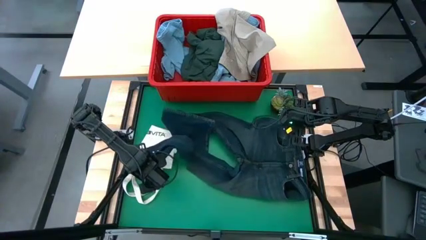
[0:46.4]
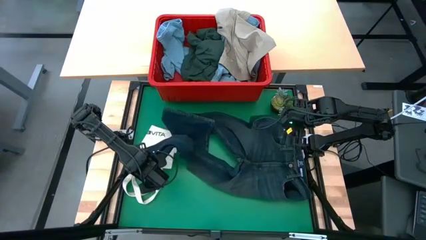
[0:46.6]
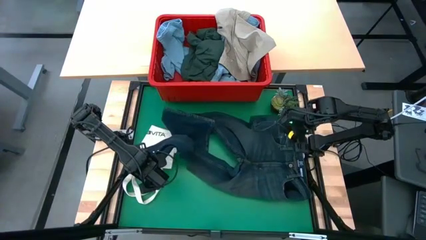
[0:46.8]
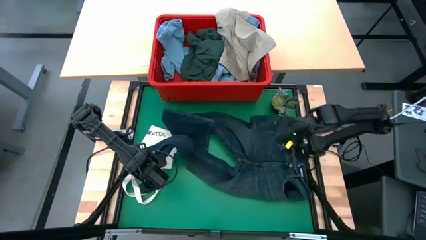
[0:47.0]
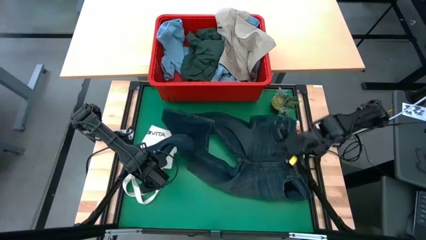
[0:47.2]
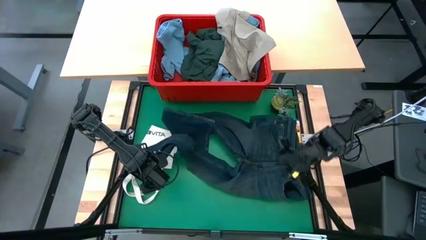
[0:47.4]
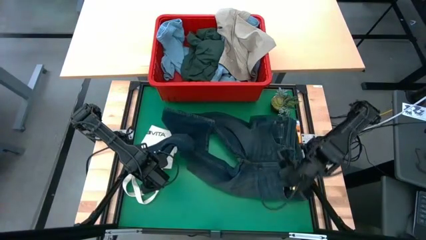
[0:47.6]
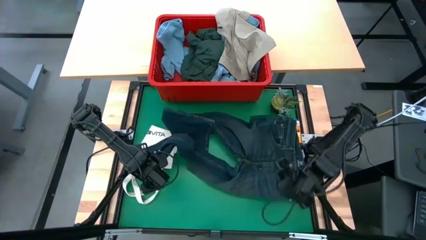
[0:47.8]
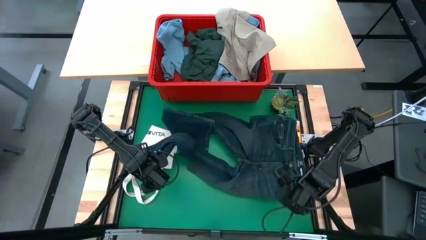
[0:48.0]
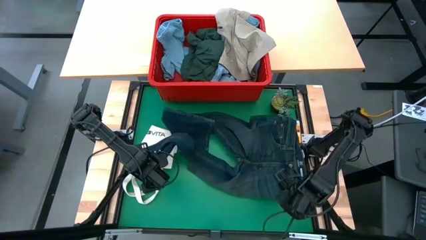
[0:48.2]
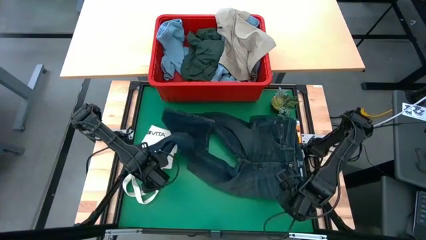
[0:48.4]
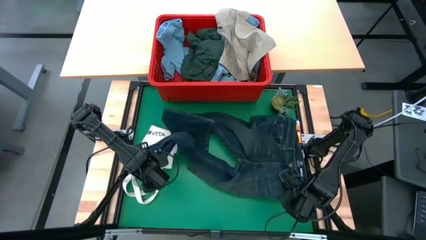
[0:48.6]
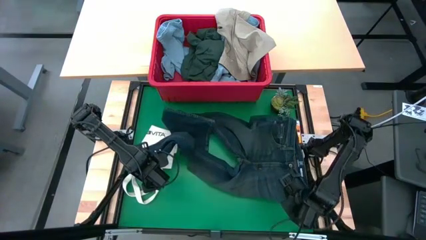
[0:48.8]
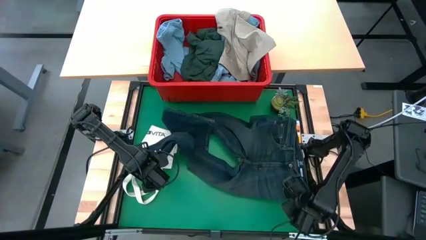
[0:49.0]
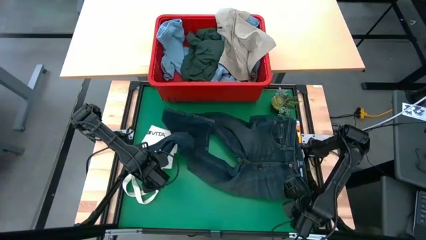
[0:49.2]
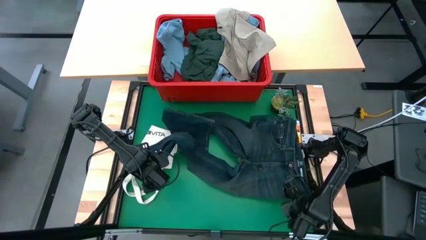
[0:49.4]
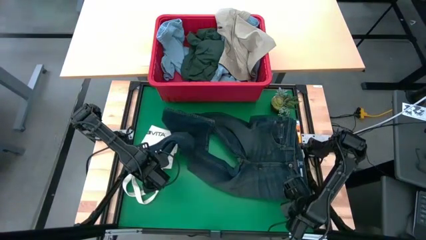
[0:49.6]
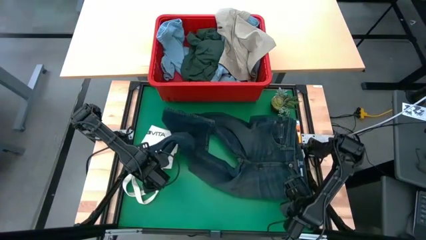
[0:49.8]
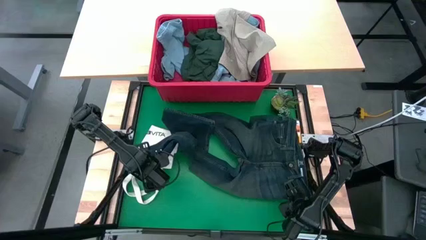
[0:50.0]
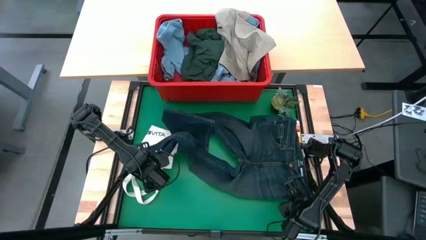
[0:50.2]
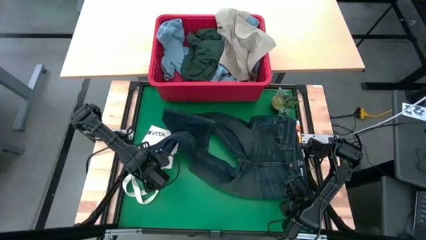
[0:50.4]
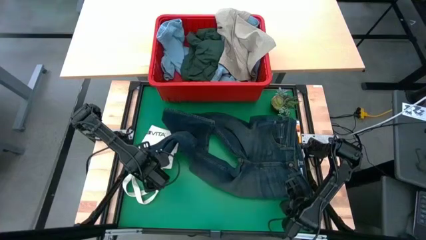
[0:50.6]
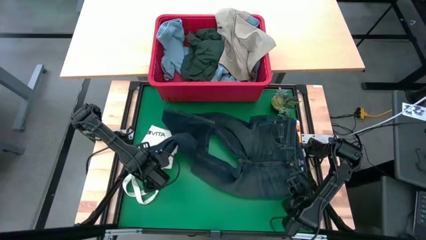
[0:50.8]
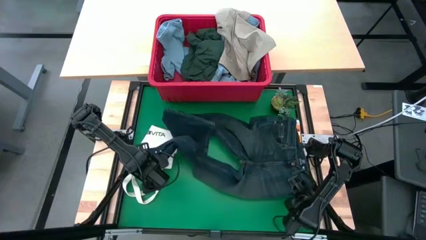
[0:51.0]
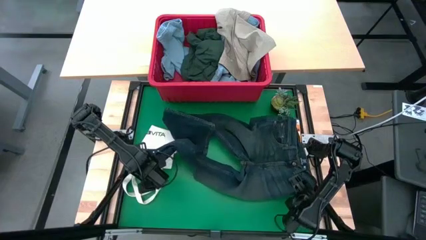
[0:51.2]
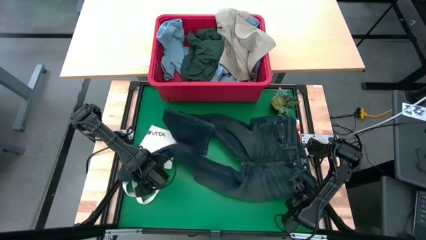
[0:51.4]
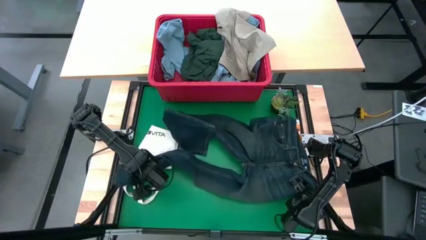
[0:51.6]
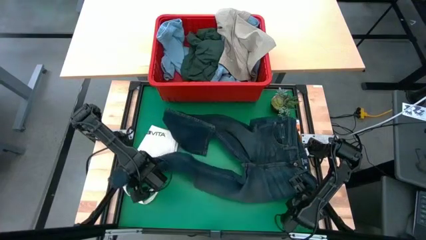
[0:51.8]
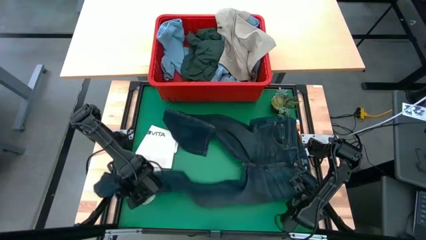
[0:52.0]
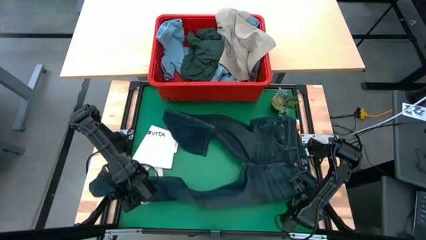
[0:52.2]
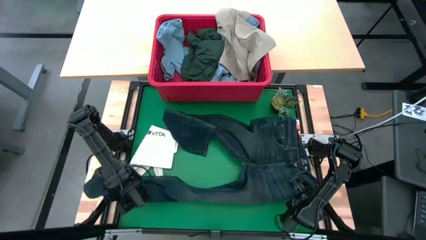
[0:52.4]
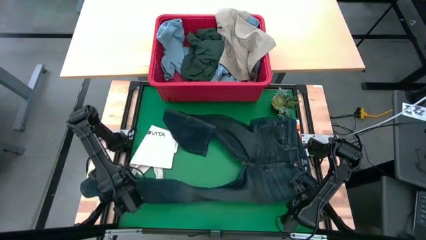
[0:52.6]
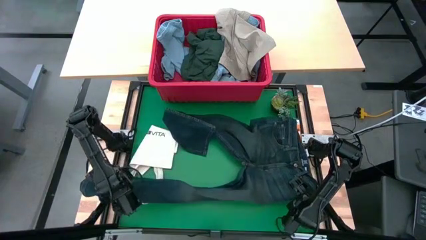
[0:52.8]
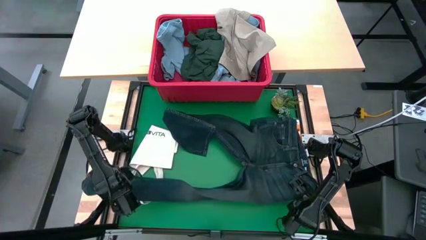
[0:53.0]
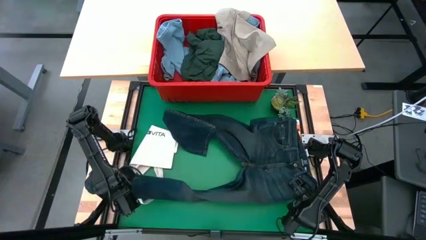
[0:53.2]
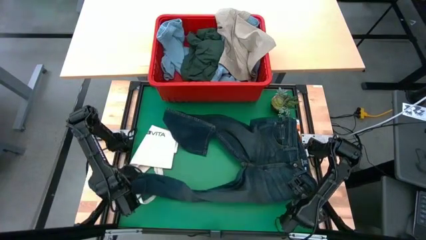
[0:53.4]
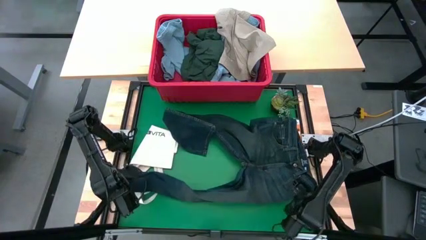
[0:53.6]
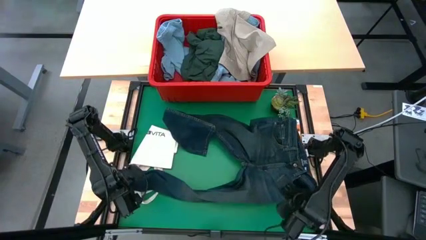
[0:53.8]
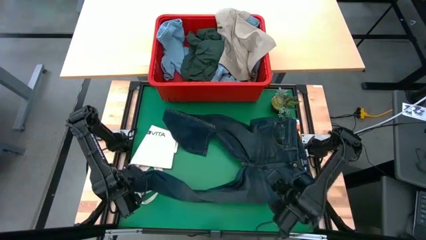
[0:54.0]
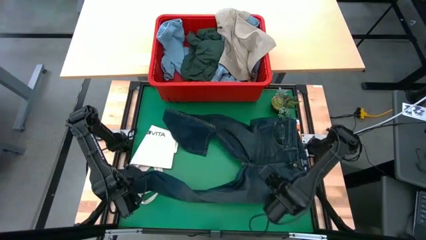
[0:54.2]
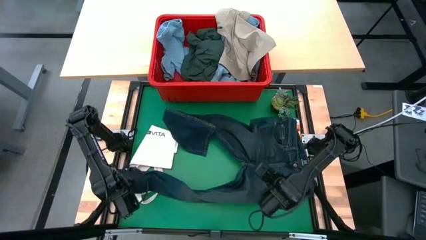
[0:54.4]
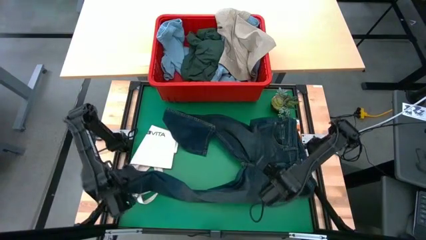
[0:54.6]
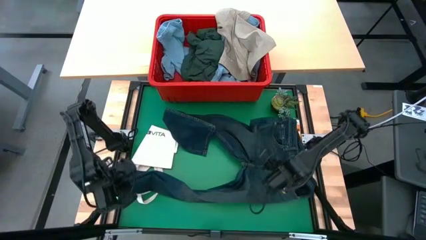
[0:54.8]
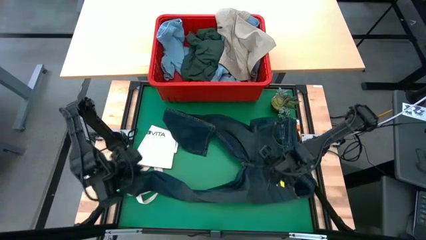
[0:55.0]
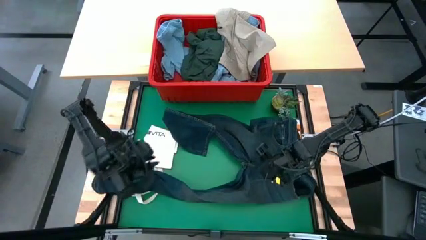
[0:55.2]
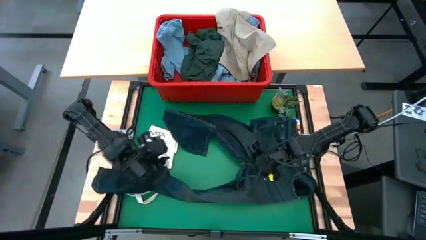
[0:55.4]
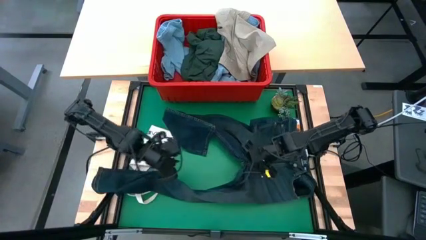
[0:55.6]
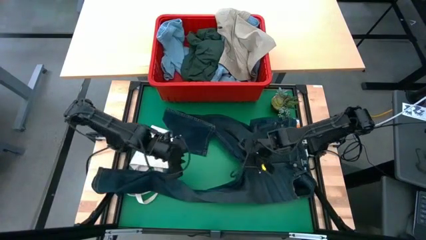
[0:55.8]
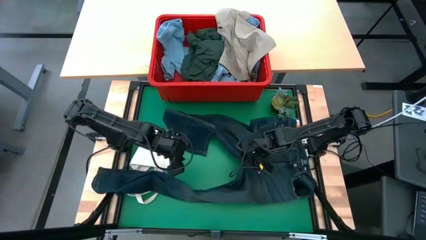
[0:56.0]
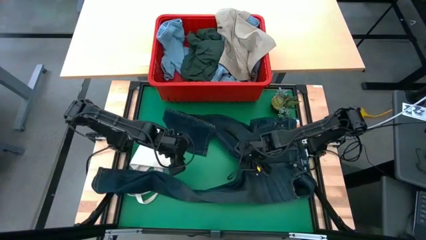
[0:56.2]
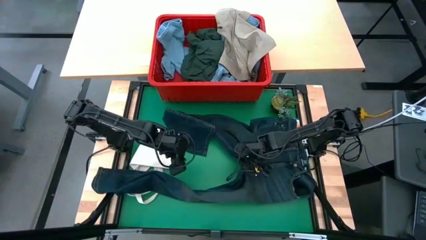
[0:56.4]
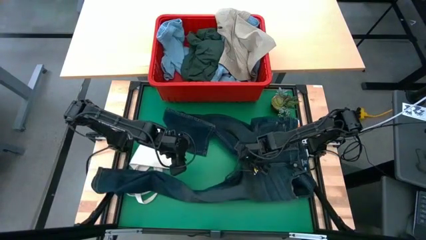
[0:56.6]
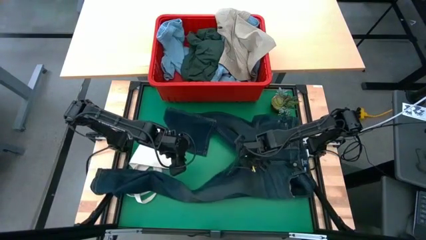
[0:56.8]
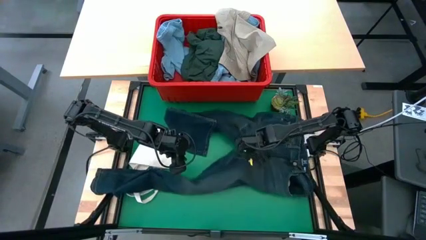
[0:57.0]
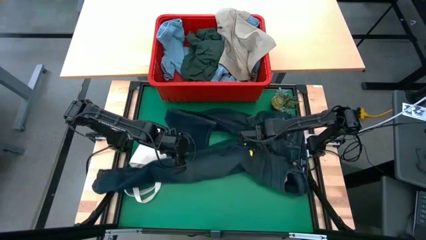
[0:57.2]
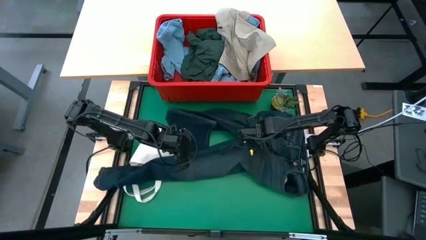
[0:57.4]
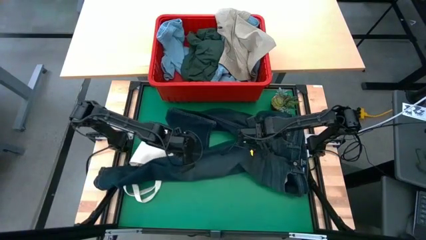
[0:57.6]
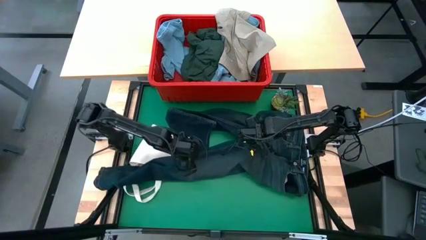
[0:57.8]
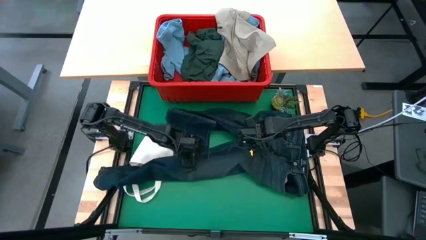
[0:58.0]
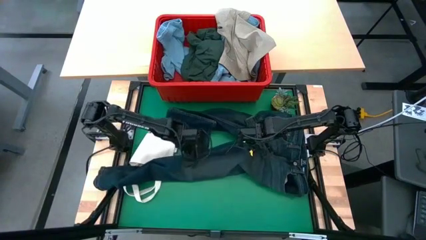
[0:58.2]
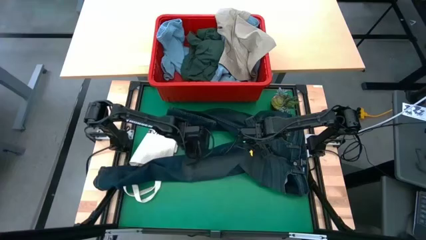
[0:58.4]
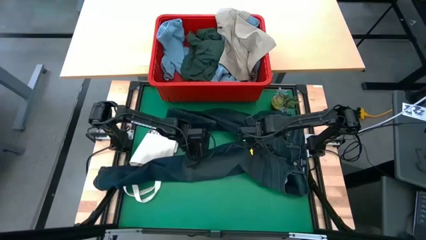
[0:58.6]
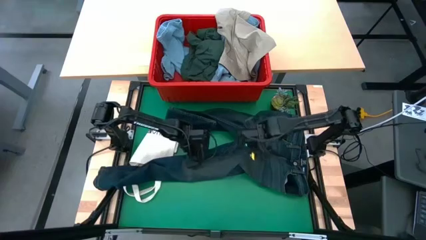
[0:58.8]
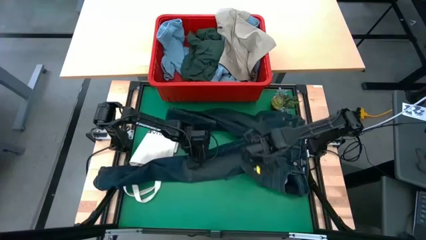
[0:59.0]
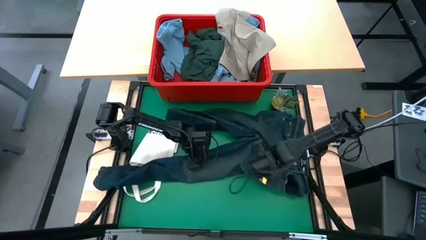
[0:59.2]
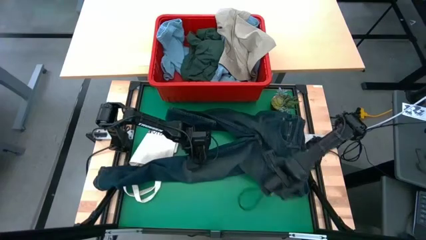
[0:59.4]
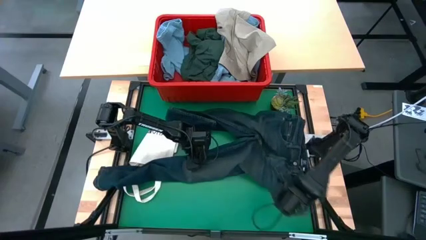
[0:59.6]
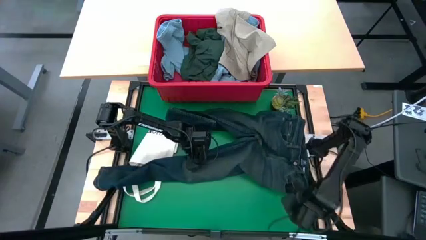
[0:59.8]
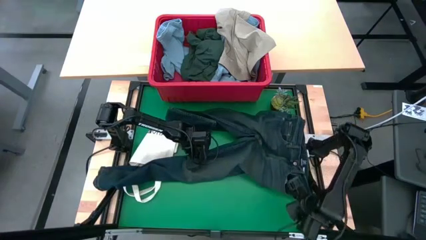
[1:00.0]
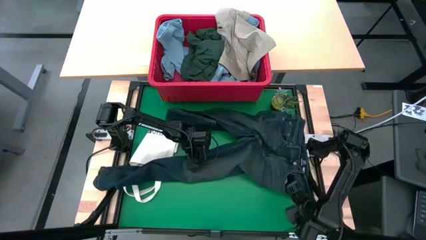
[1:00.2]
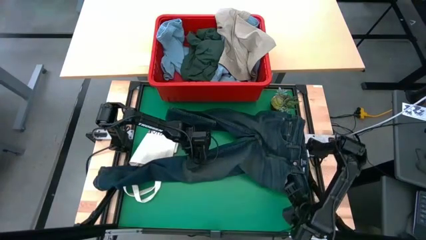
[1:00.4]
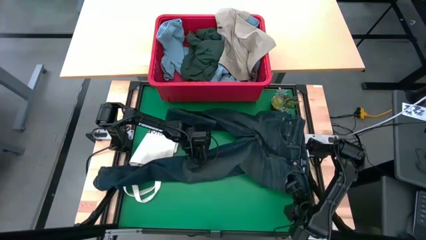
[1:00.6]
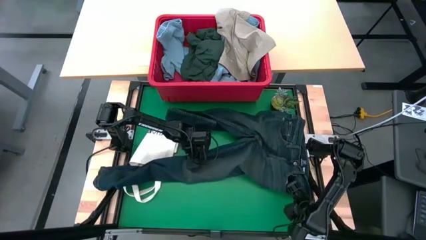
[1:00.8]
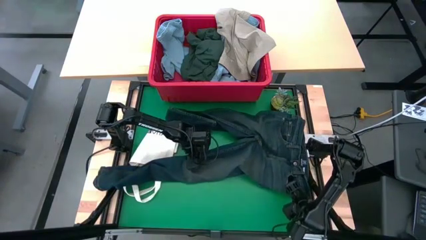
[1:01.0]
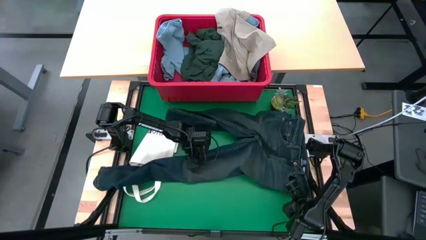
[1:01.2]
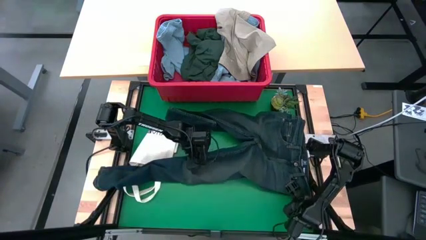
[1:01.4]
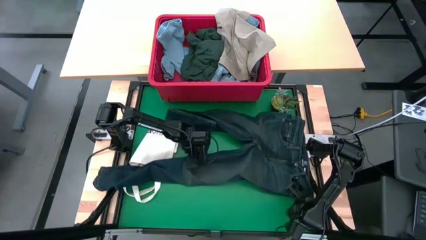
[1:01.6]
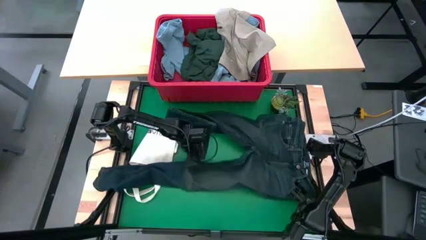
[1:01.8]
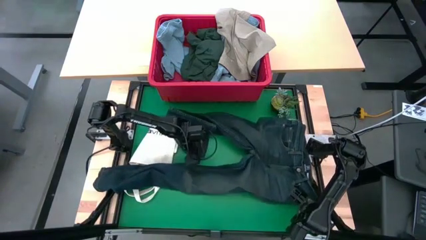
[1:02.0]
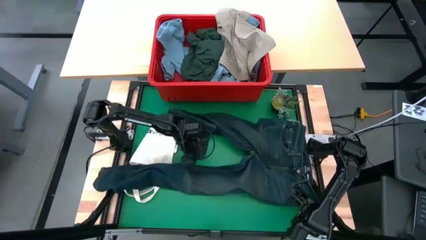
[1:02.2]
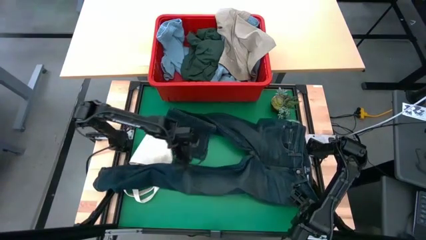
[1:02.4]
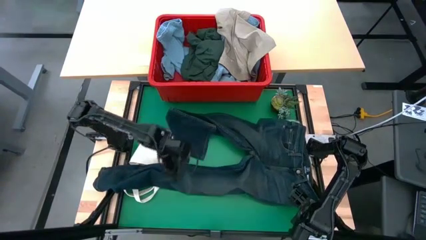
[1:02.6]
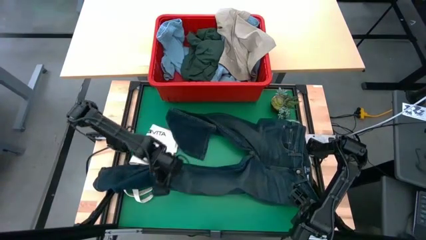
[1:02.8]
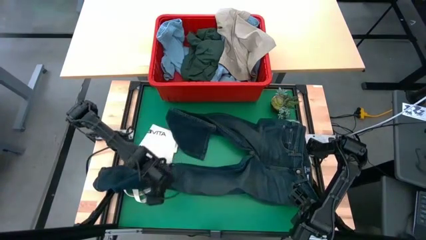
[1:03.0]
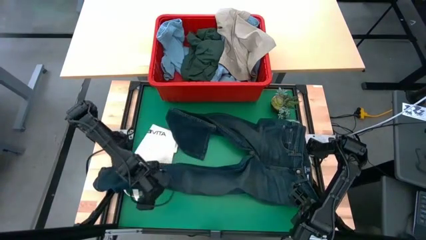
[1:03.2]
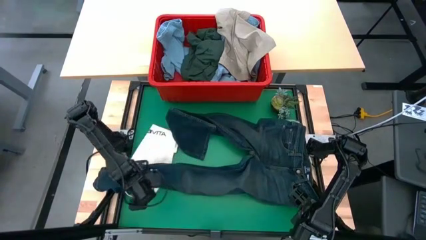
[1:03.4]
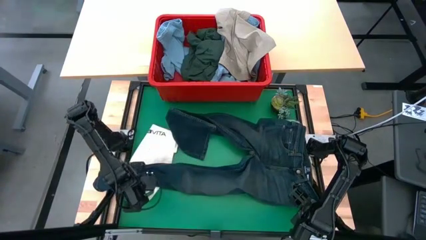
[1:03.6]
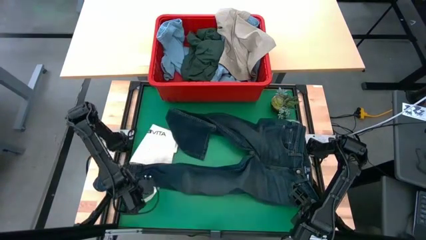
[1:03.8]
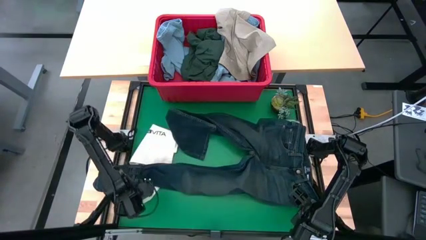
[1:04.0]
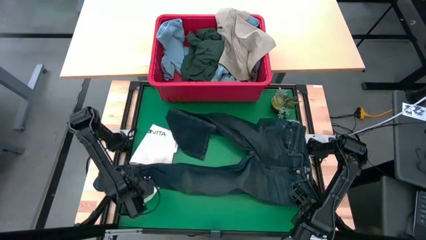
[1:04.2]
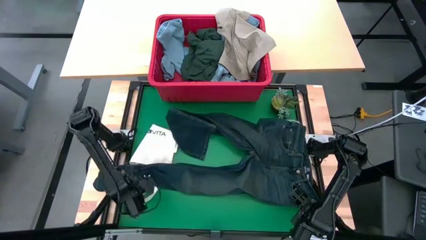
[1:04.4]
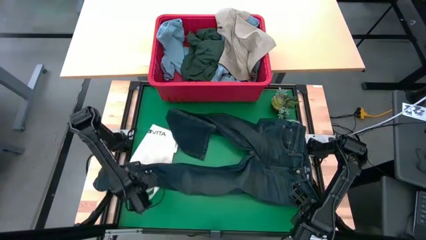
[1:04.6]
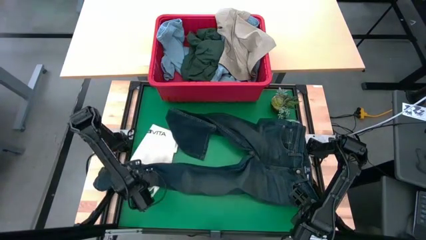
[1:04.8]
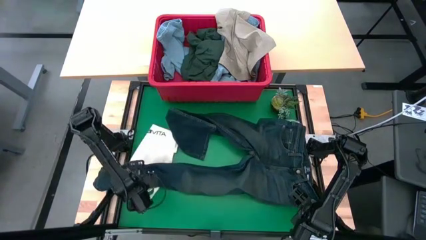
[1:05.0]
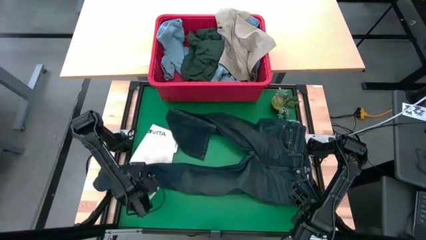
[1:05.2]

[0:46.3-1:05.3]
Task: Fold laundry
Fold the dark blue pants
